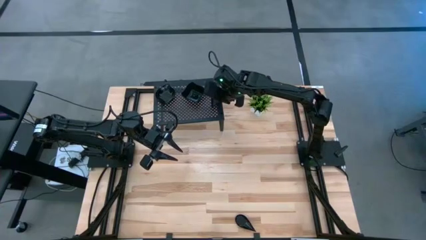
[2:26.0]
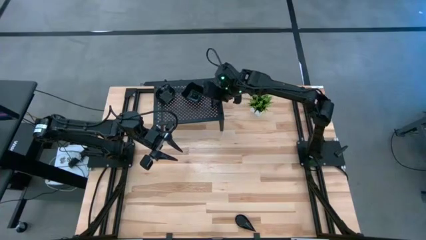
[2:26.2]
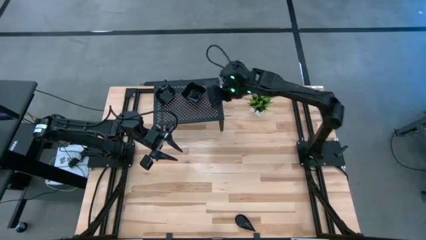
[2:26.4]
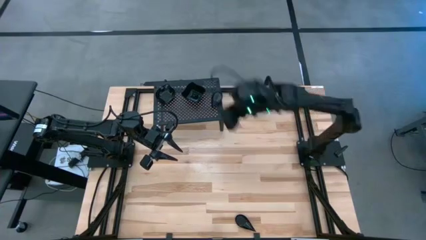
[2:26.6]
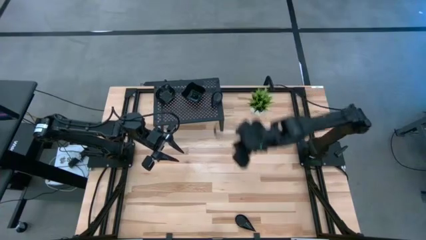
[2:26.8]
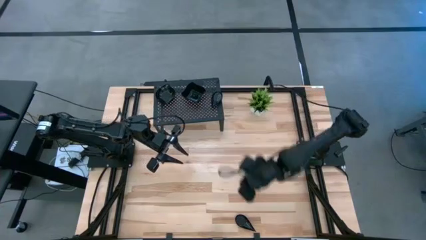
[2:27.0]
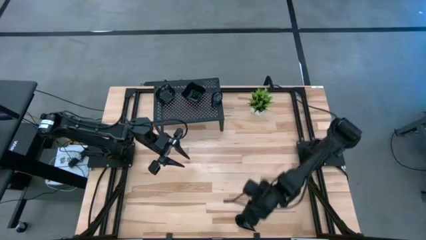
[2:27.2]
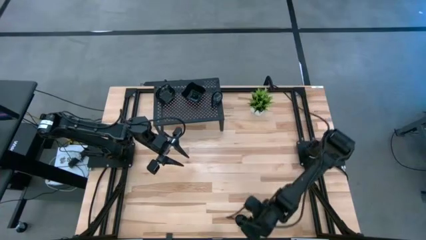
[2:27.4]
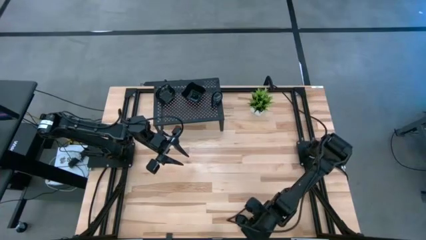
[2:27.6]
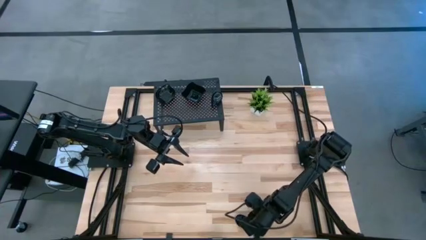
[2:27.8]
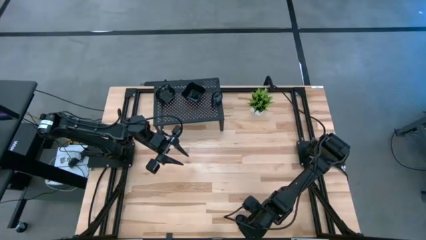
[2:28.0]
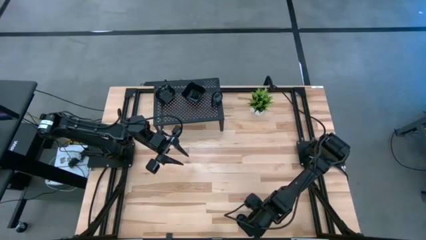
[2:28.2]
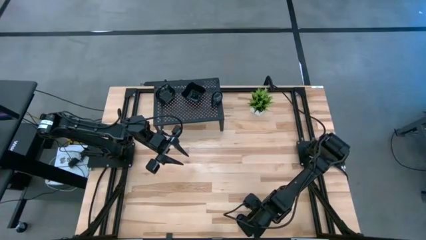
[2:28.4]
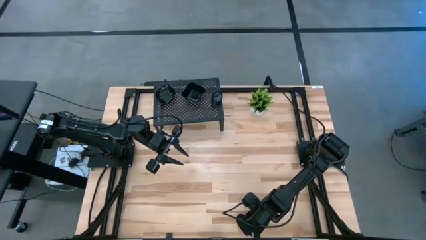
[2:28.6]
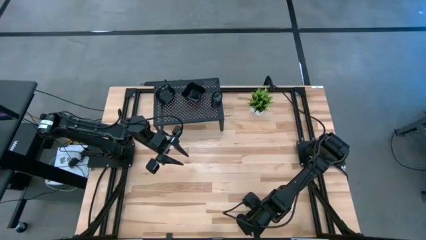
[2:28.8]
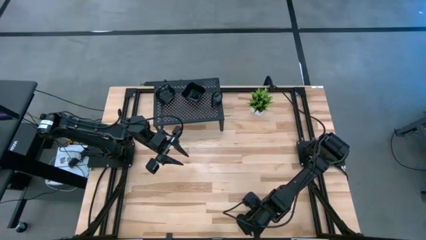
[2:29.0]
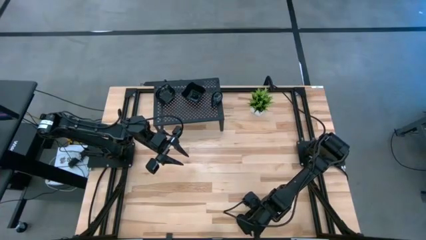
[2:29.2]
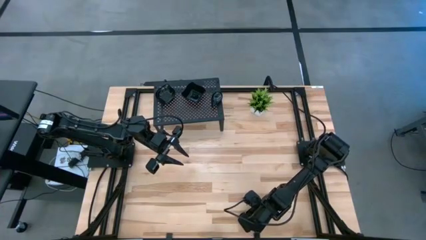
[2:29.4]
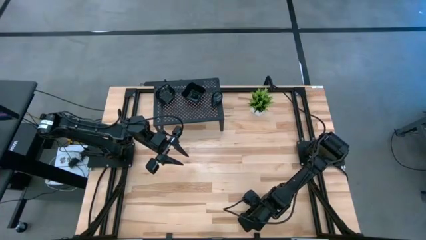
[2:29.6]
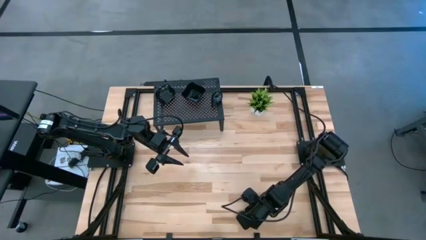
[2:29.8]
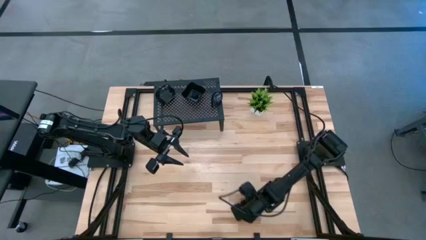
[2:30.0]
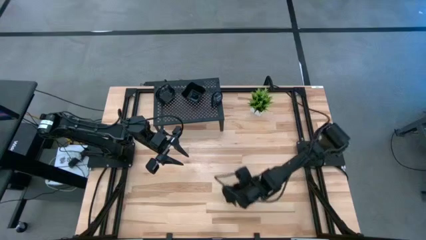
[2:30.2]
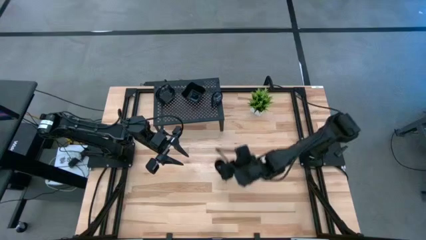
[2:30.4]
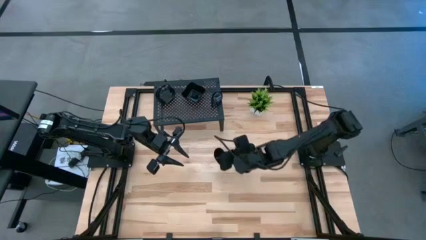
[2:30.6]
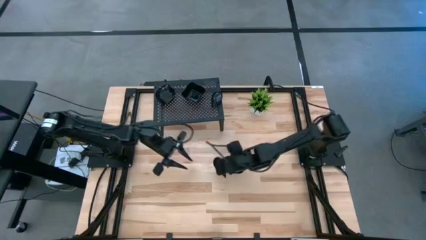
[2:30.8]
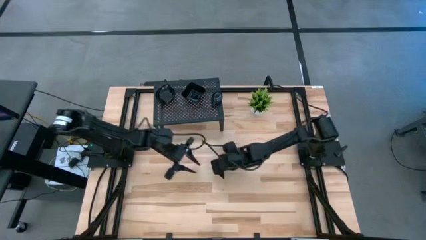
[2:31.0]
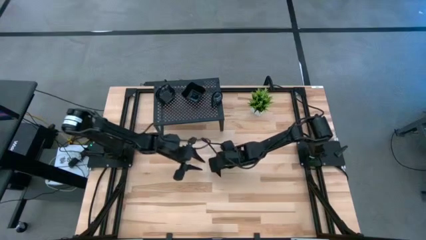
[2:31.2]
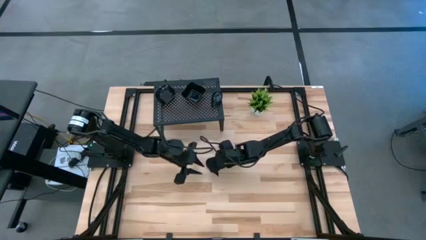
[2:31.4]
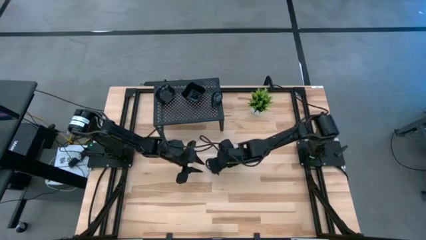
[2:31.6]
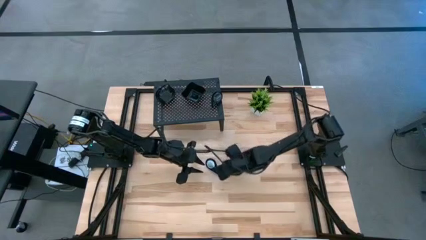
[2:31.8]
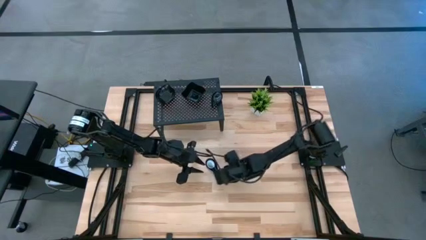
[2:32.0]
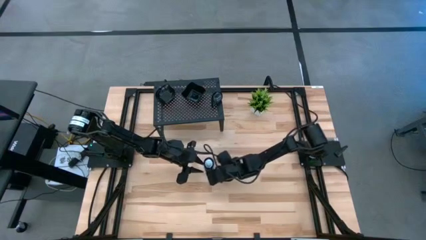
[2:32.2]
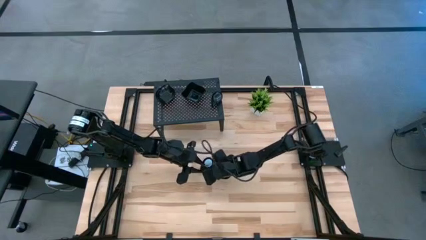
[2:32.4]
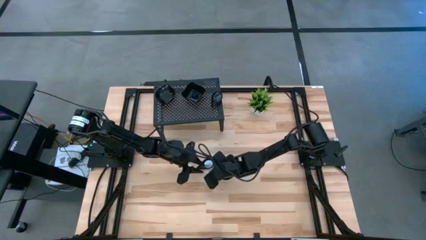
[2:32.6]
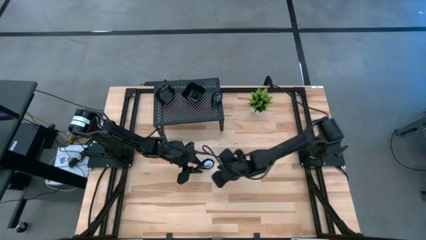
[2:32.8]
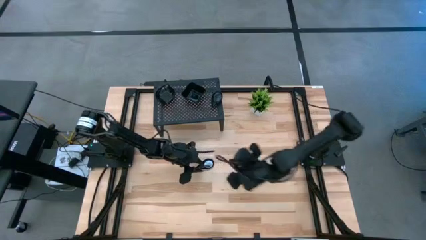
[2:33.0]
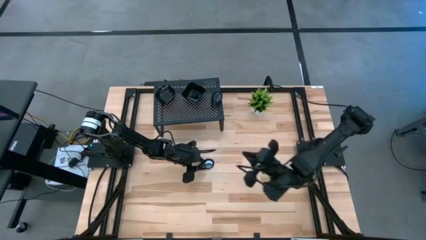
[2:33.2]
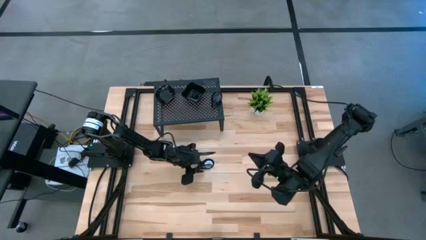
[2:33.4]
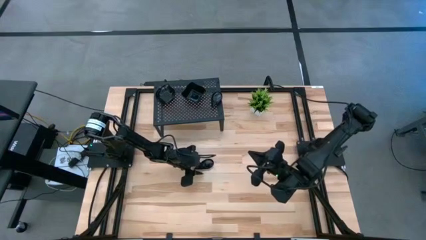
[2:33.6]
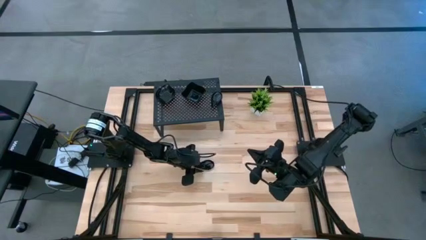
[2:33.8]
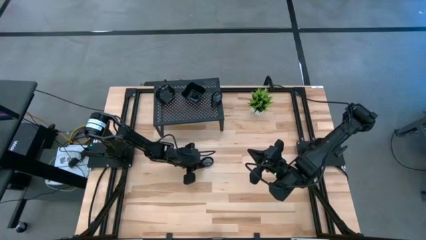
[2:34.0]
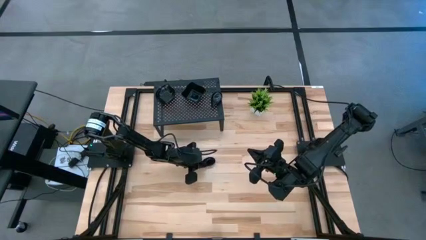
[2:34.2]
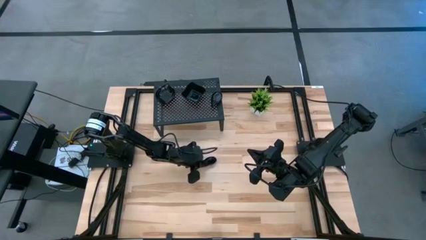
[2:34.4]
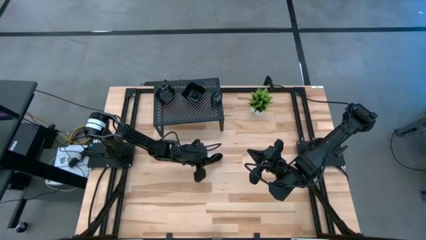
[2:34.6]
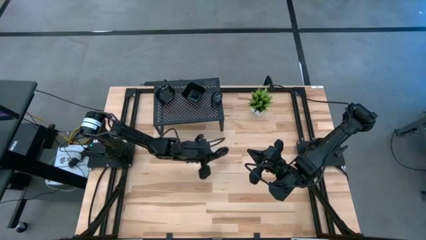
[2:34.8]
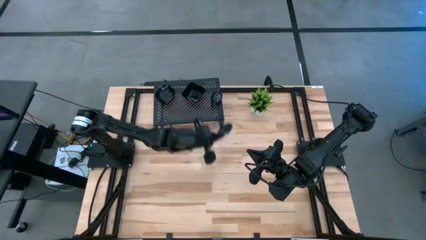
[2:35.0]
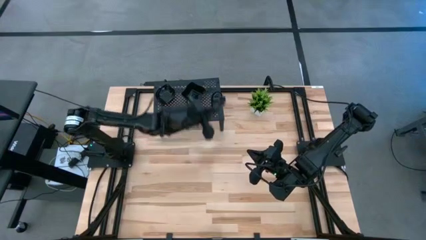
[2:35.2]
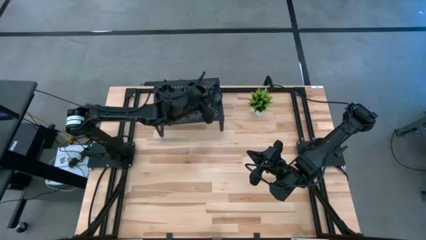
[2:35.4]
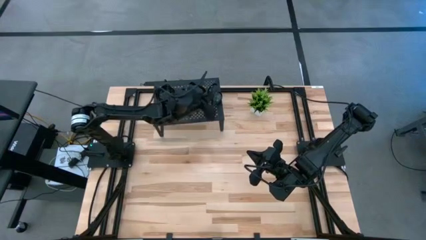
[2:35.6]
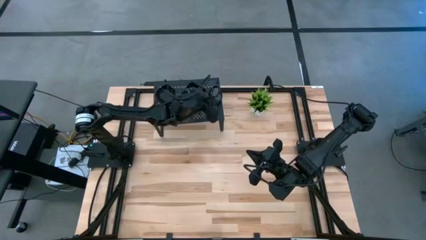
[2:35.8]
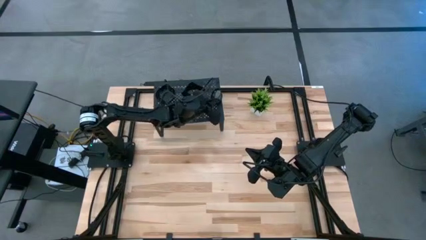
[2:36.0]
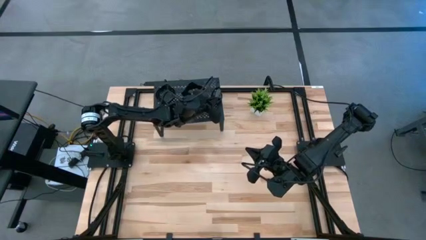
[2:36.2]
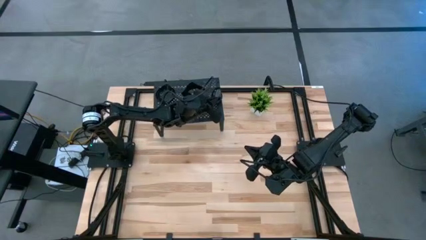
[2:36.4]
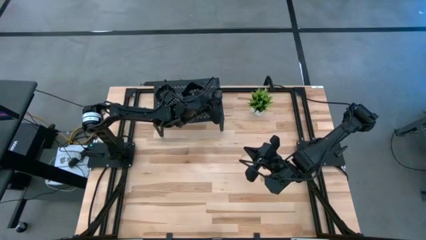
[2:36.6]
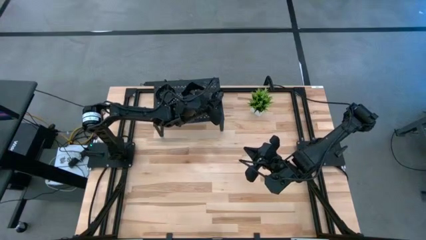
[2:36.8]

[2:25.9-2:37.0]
Task: Pick & Place Mini shaped plates
Stack the black drop shaped plate on the top of the black drop shaped plates on the shelf
